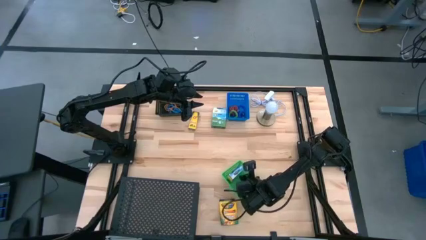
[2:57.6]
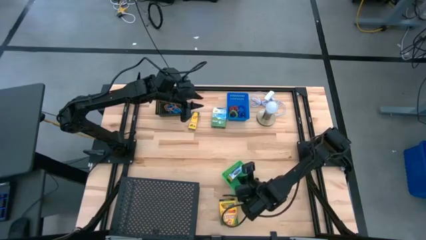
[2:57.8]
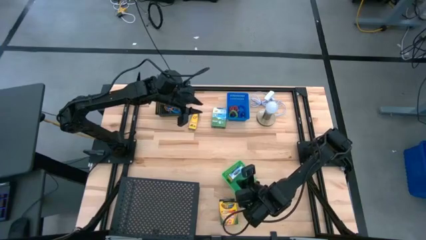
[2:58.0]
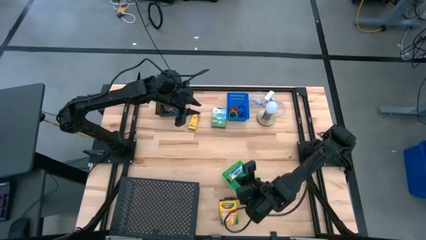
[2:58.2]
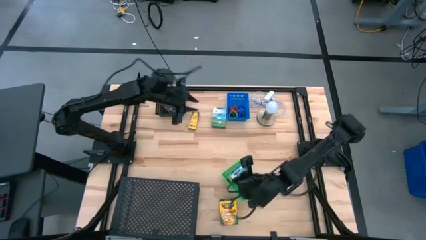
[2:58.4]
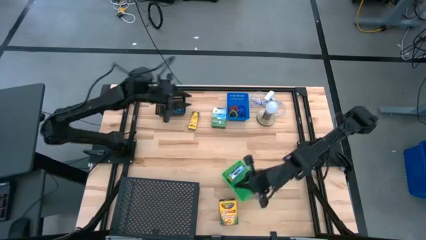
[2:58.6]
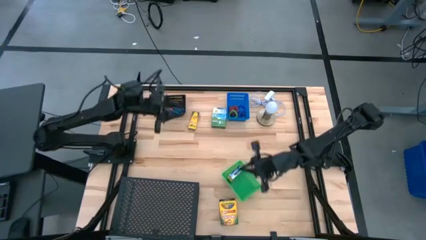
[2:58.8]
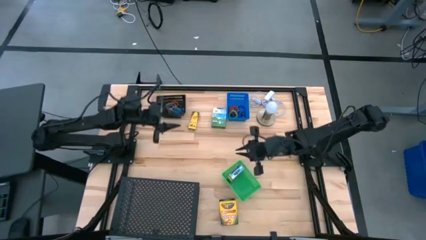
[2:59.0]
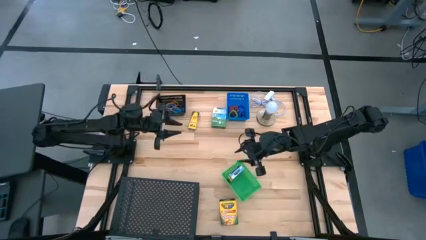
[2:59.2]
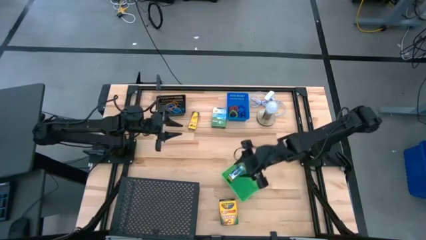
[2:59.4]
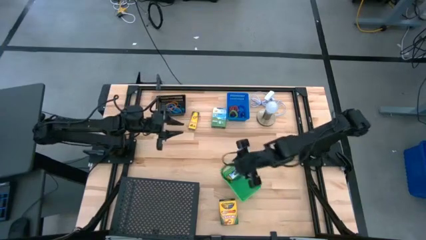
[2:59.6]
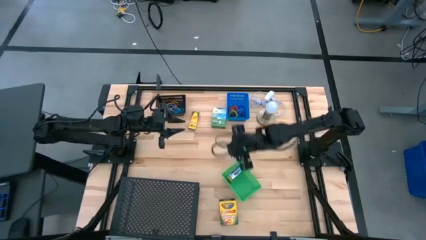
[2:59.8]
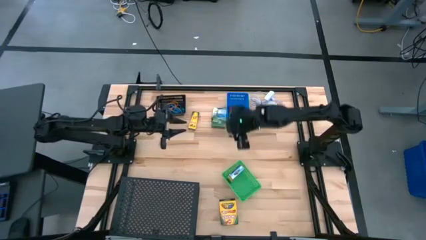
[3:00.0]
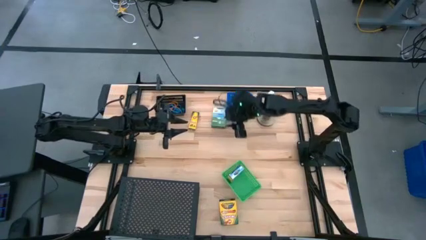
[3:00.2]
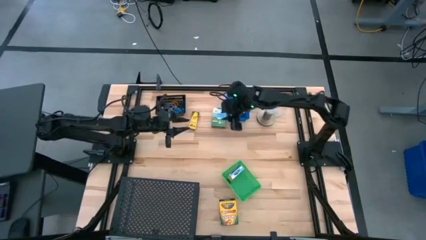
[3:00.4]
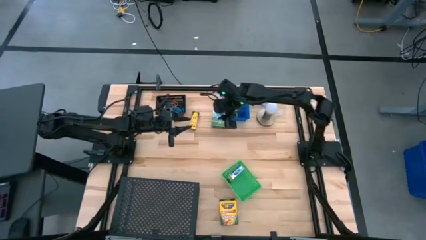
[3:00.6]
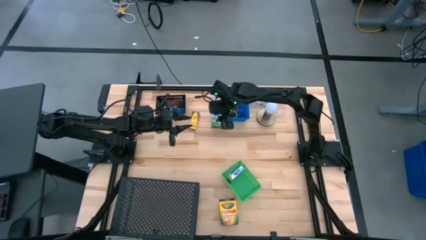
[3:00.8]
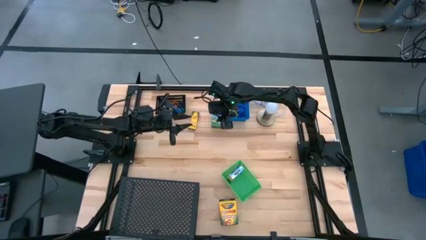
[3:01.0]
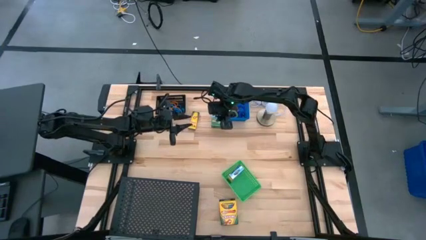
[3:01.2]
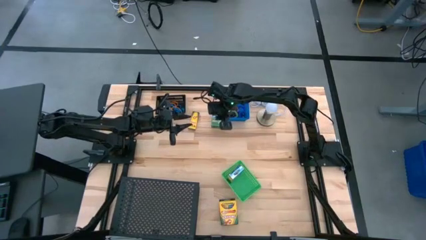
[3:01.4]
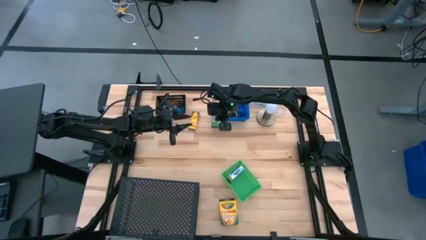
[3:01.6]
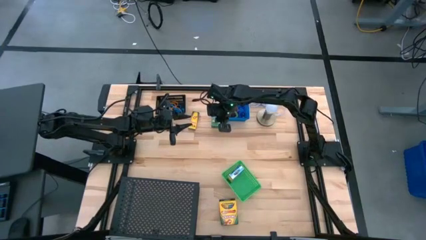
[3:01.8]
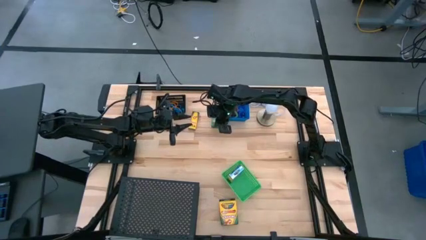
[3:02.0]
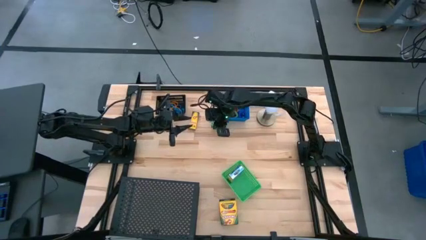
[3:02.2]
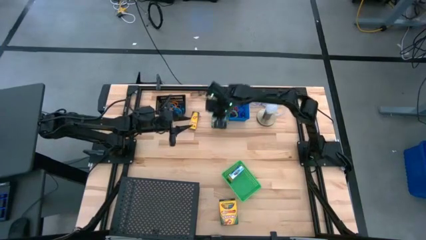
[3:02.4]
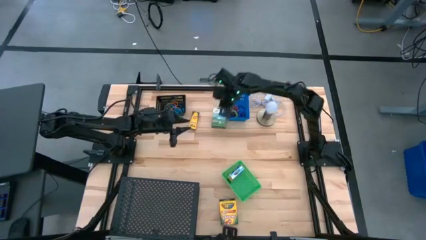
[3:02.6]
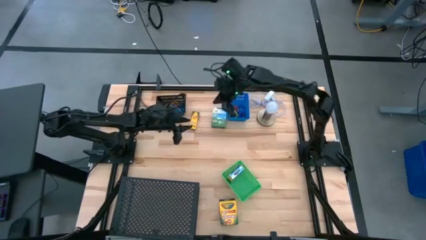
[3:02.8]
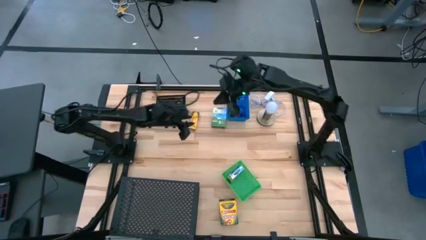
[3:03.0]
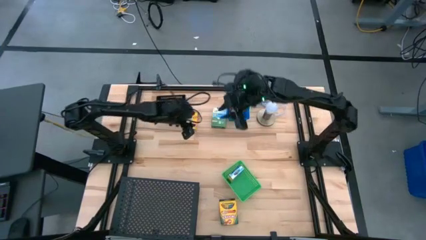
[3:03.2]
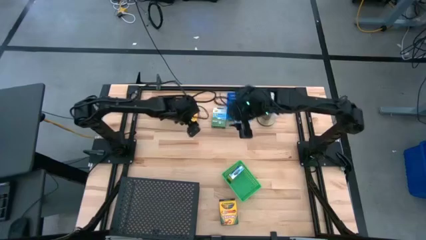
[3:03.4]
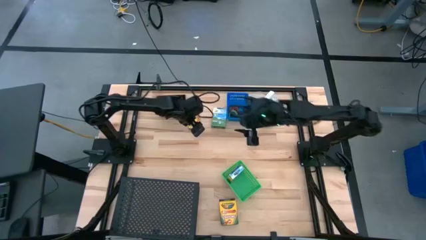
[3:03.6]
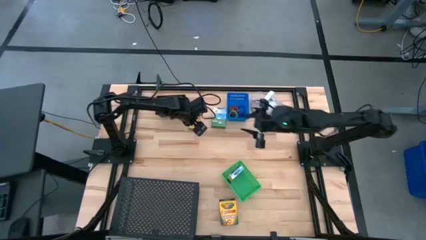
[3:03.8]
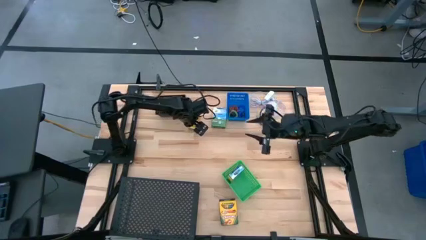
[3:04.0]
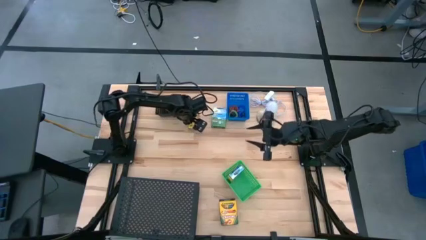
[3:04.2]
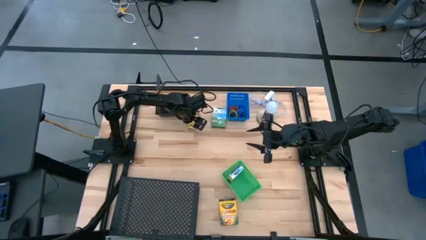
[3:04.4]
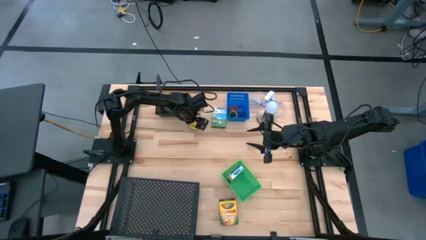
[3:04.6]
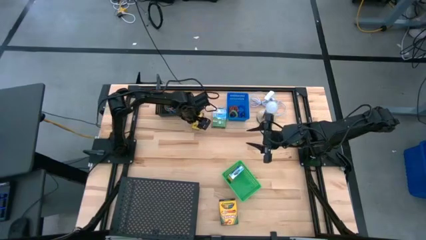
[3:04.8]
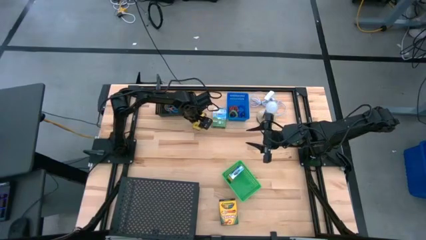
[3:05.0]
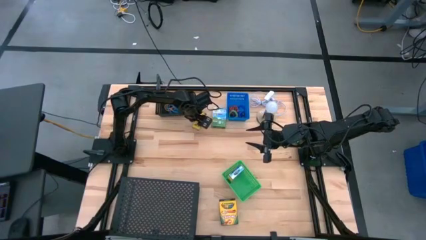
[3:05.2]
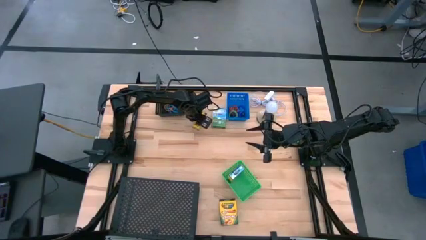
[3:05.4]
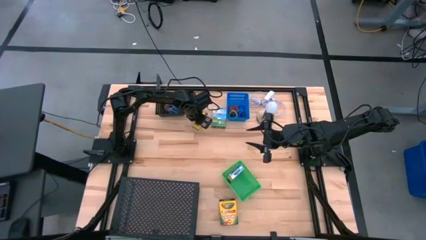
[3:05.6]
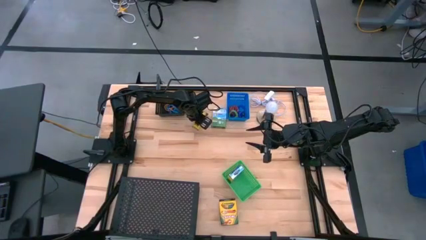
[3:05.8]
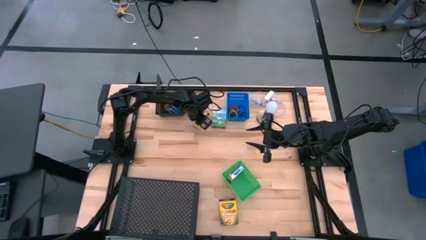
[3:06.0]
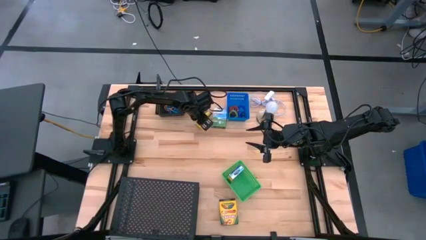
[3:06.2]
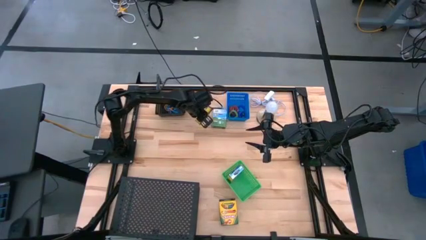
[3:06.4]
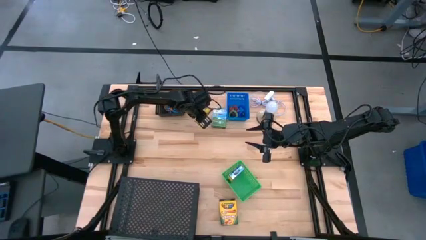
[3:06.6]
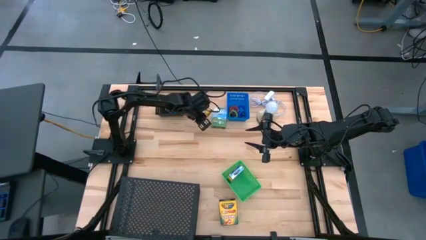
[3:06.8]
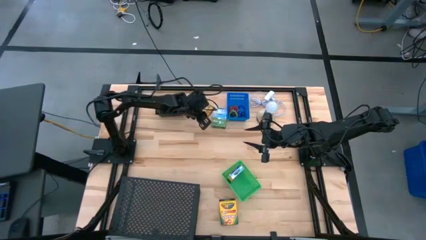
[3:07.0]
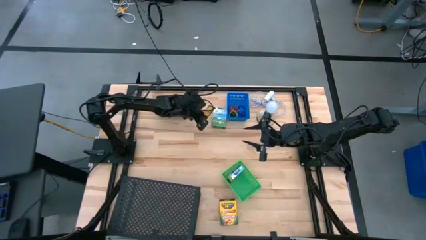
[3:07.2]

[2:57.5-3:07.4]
Task: Pick & Place Office Desk Supplies
Put the small crayon box into the green bin

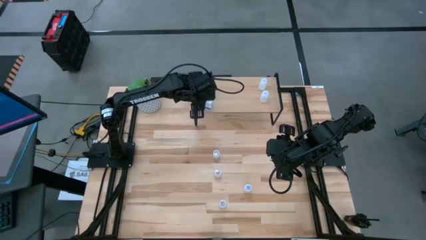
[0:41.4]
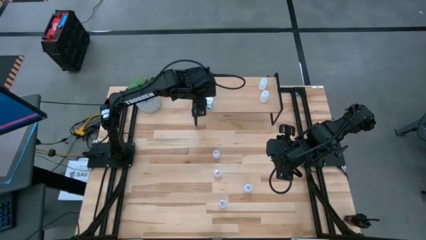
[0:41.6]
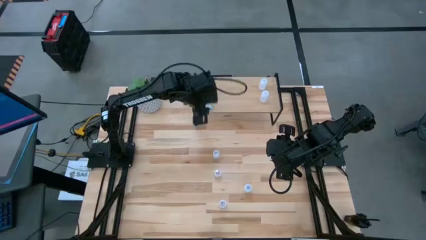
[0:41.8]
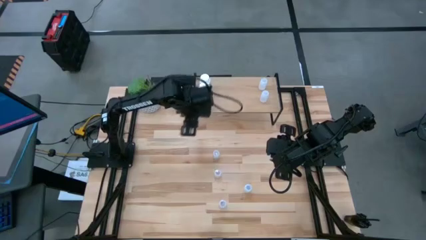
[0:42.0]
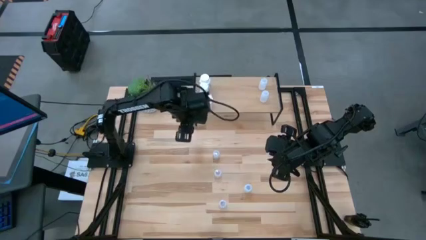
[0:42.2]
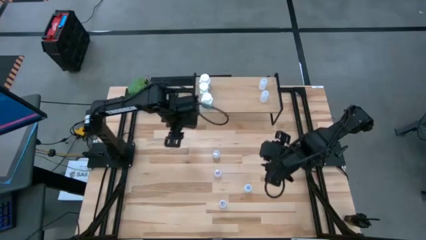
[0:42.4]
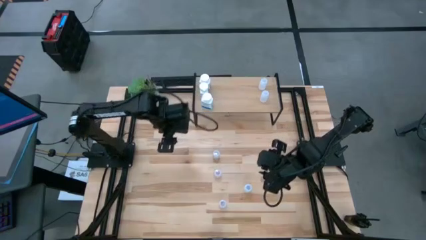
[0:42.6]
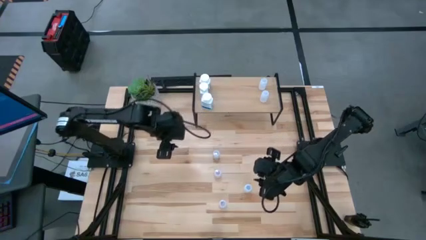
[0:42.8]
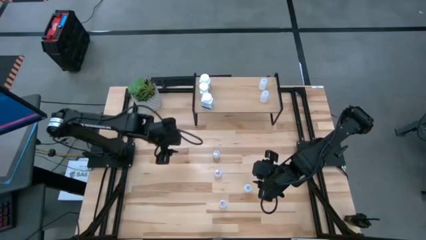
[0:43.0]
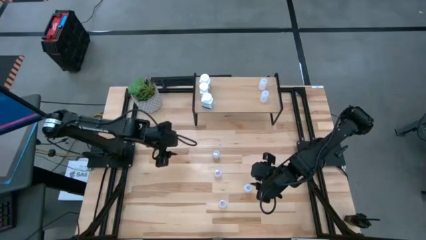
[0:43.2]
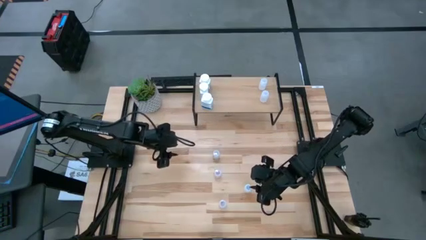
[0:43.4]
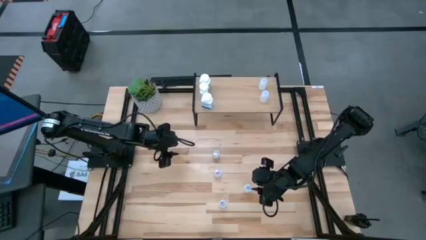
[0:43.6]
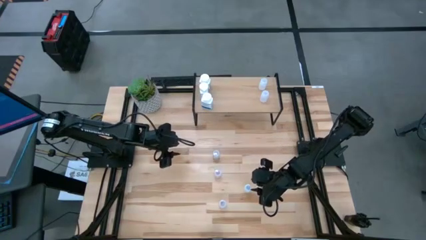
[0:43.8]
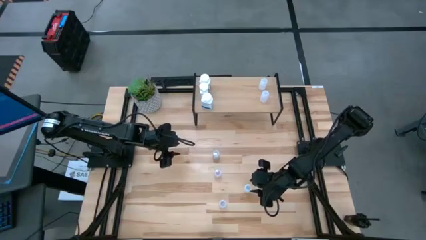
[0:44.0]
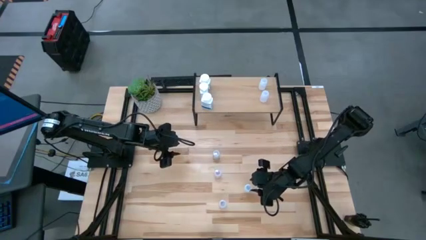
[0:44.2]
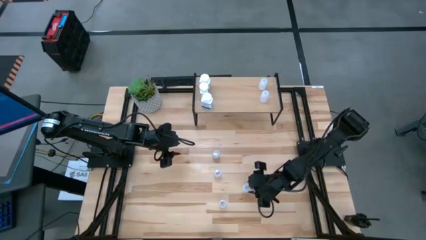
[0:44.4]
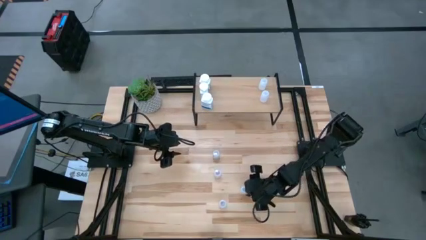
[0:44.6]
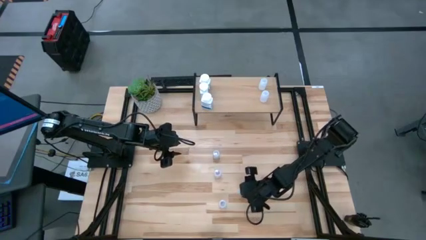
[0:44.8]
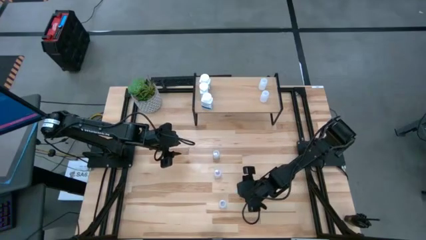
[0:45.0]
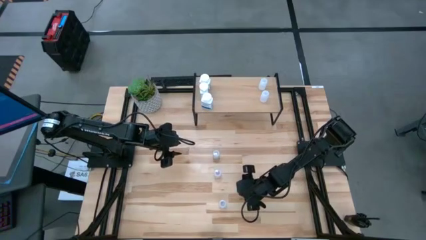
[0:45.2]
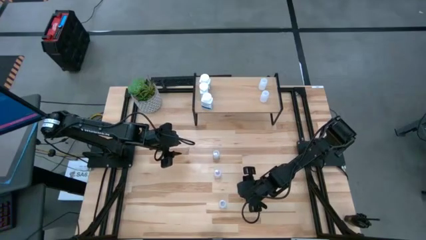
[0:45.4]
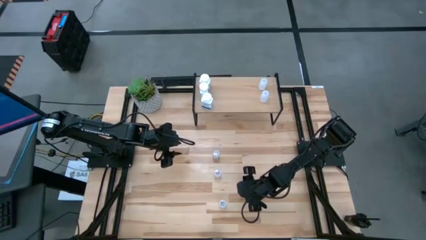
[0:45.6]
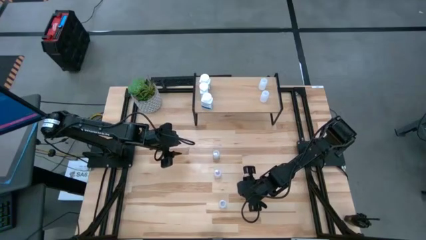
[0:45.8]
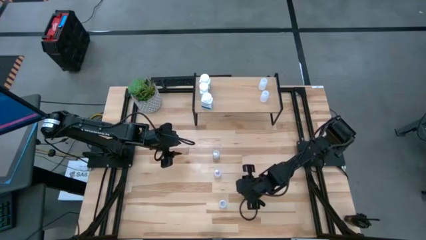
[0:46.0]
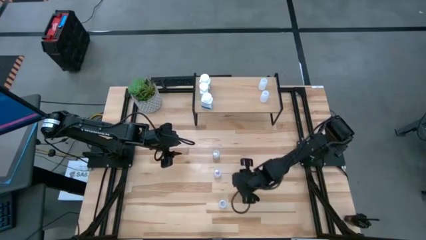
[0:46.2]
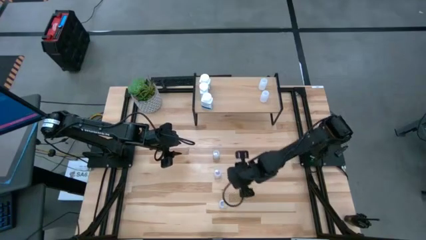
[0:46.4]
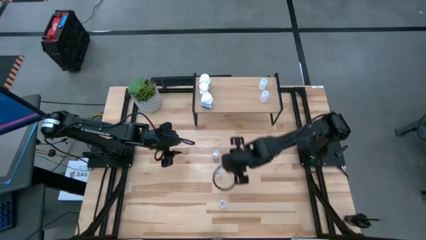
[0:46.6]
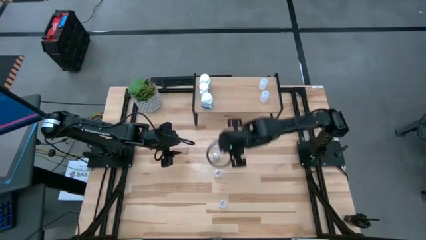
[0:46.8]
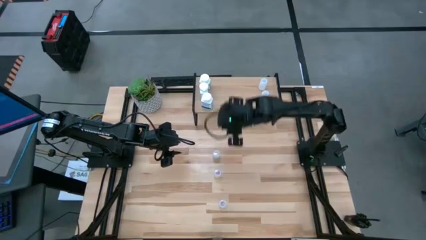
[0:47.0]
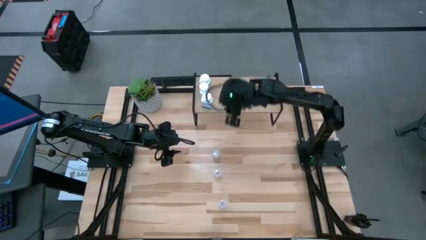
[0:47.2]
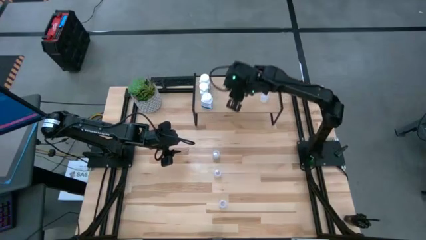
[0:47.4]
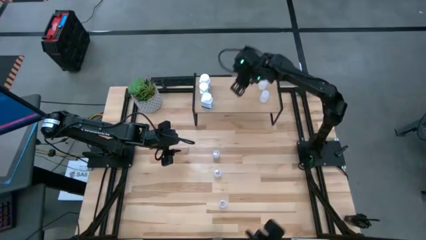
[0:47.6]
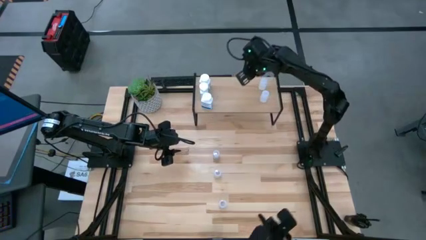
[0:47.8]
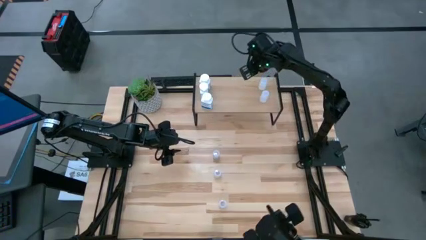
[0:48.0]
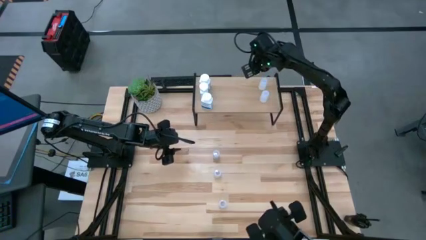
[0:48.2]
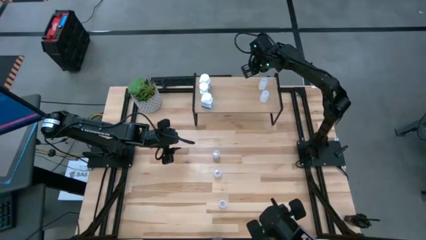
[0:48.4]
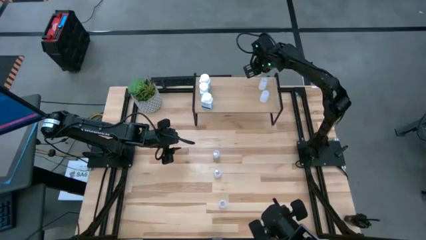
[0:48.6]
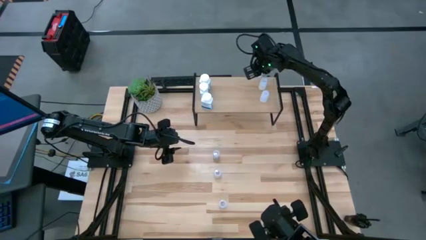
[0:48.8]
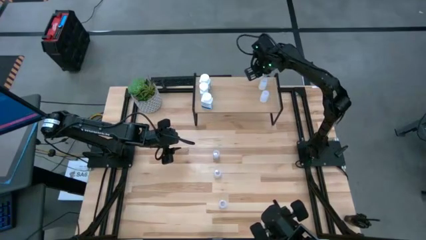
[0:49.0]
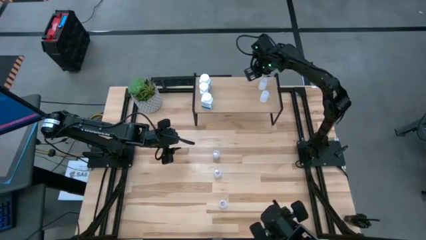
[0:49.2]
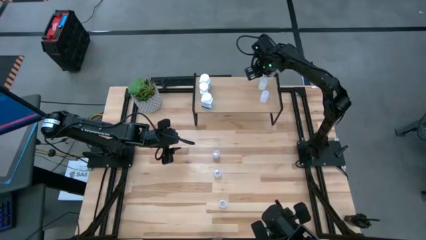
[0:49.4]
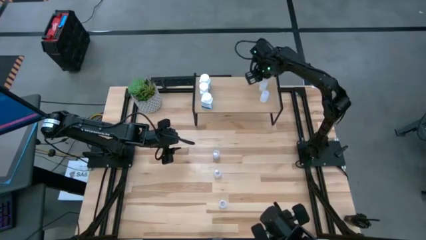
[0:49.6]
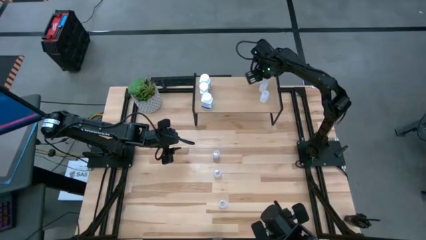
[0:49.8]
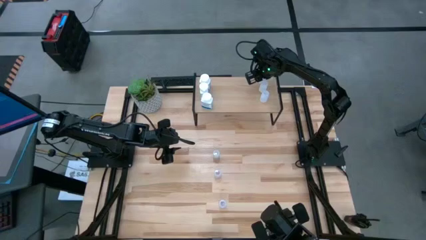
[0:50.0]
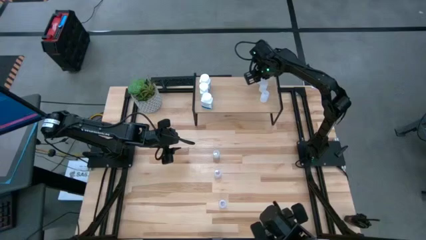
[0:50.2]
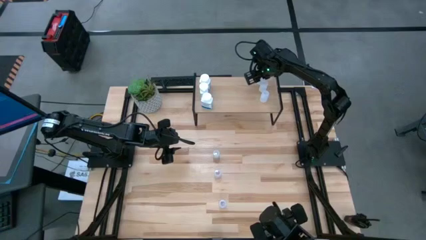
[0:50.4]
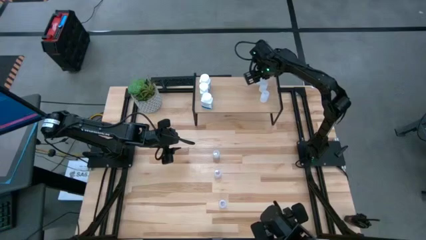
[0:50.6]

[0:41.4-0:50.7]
Task: Pick and place medicine bottles onto shelf by color
Put the small white pill bottle on the shelf aligned with the other small white pill bottles
